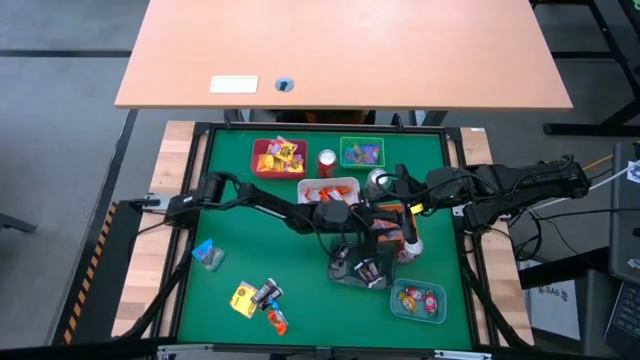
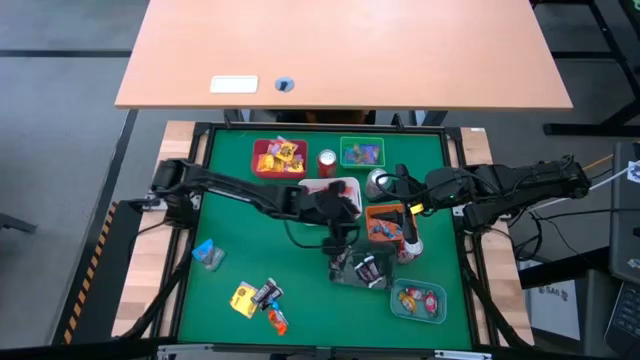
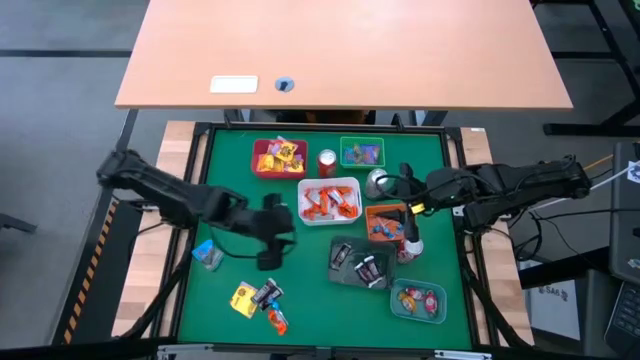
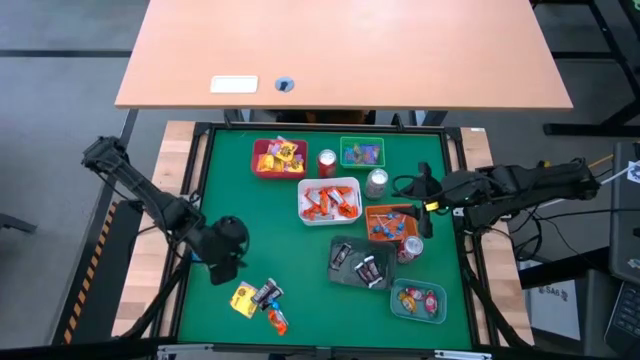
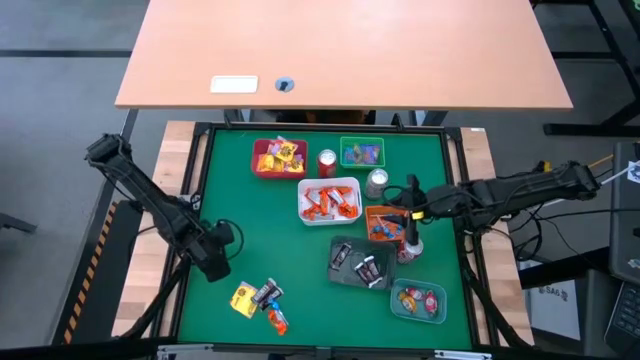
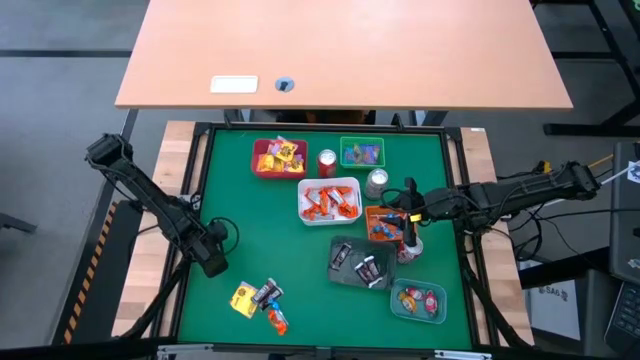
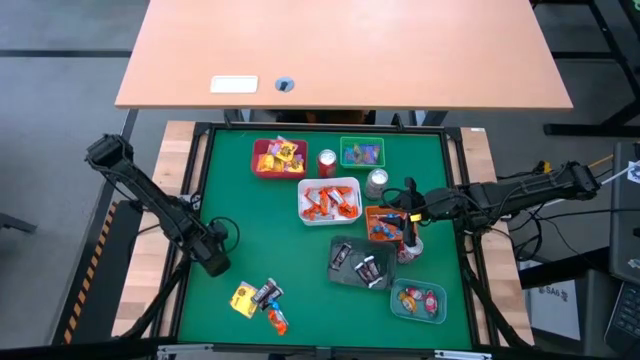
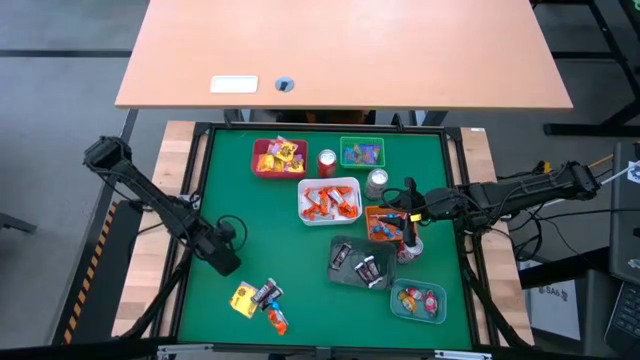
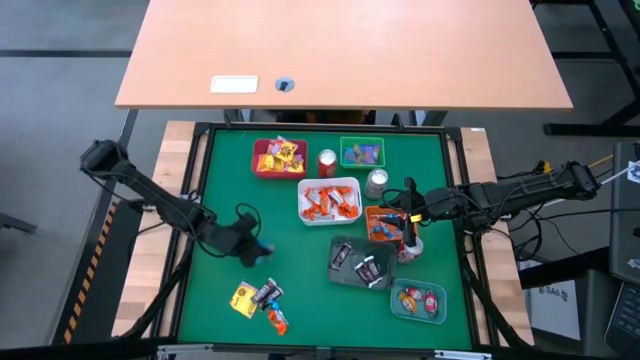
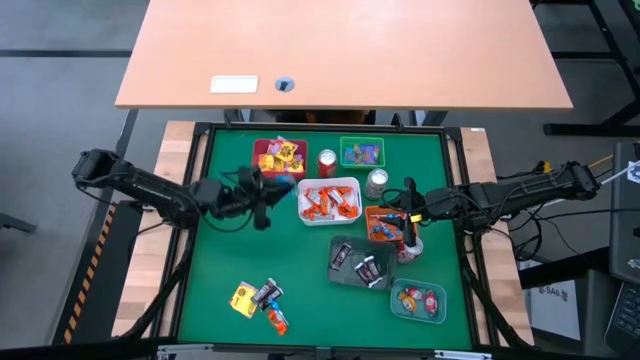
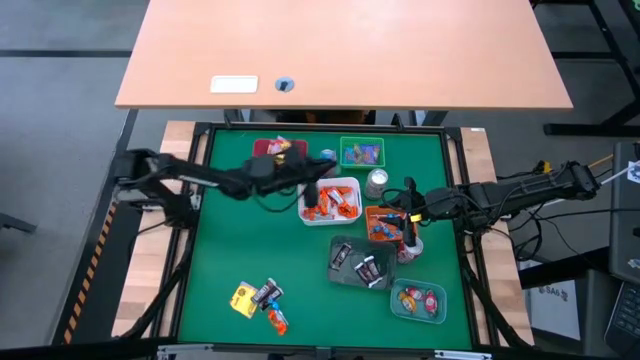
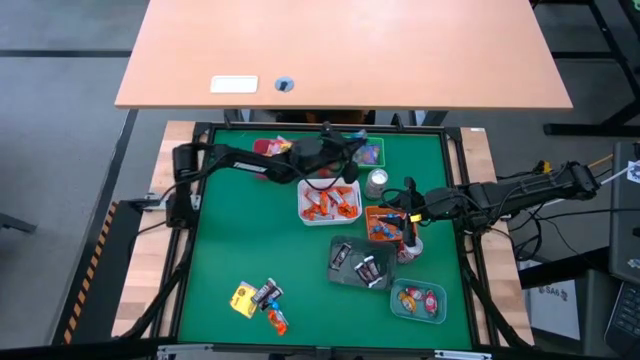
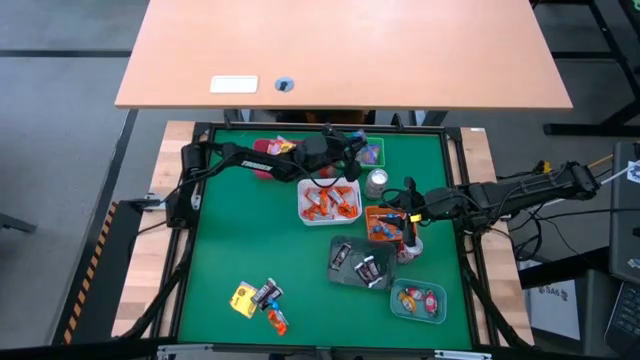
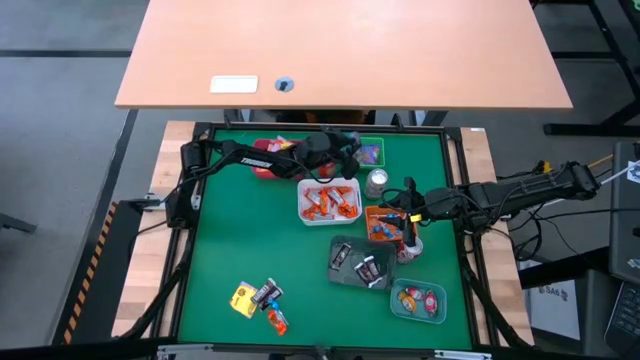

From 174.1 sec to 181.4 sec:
Task: Sort candy
Put the blue candy into the green bin

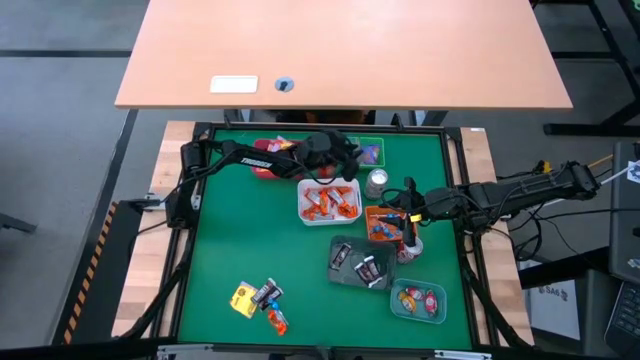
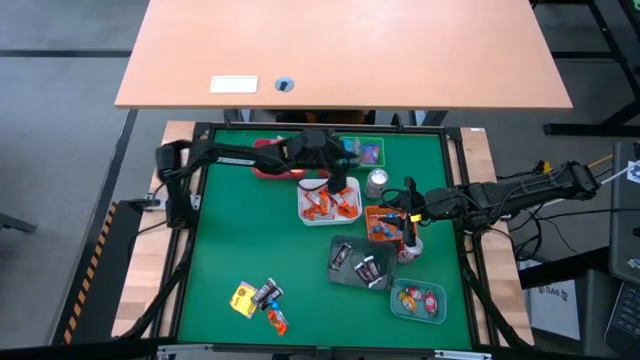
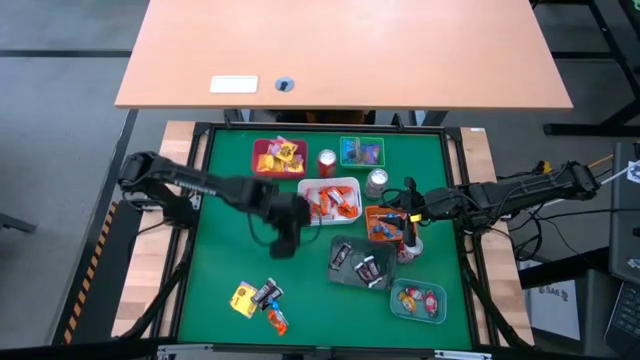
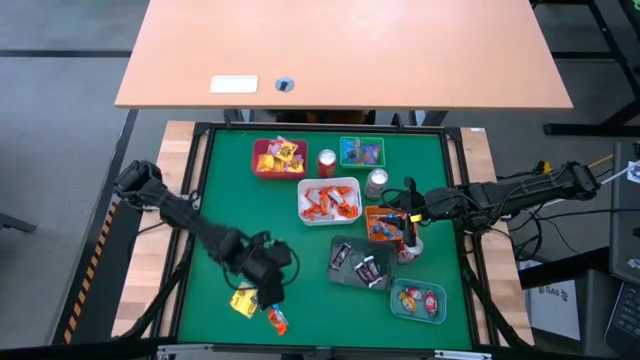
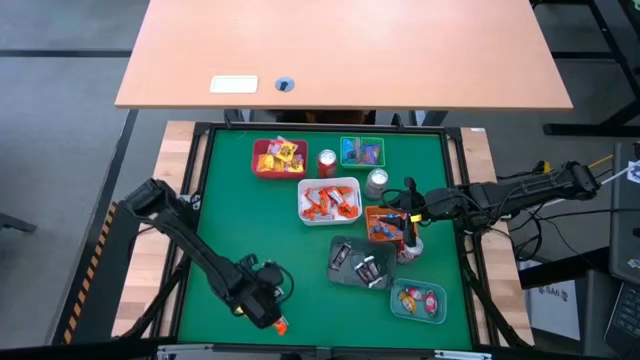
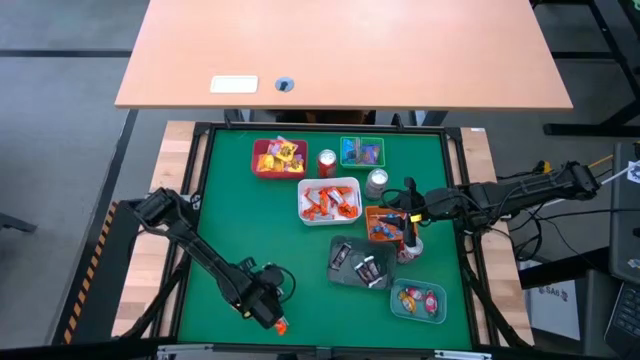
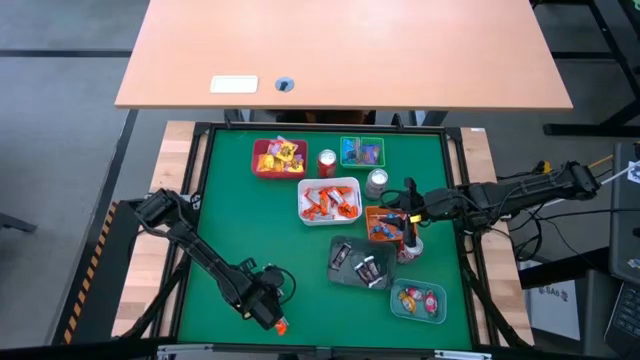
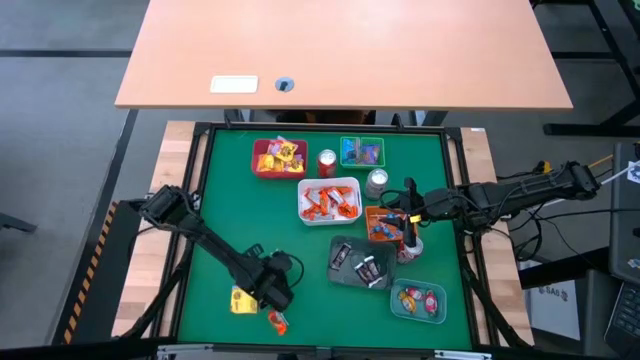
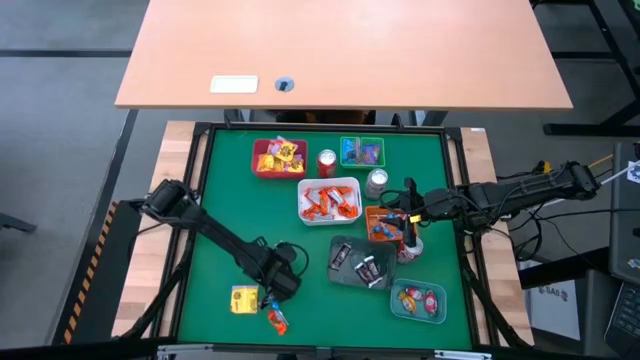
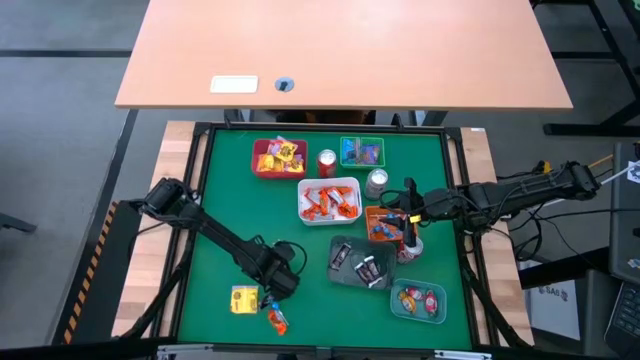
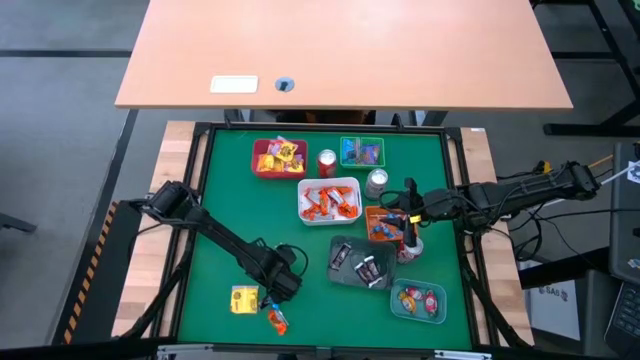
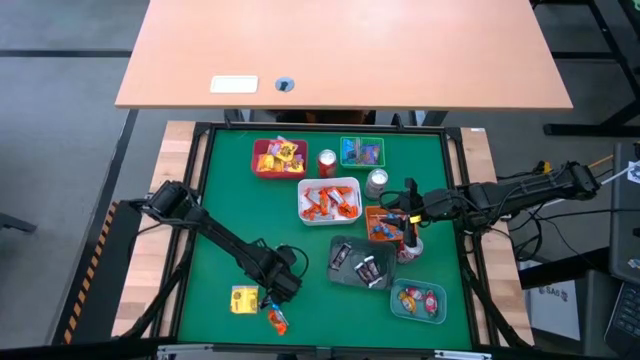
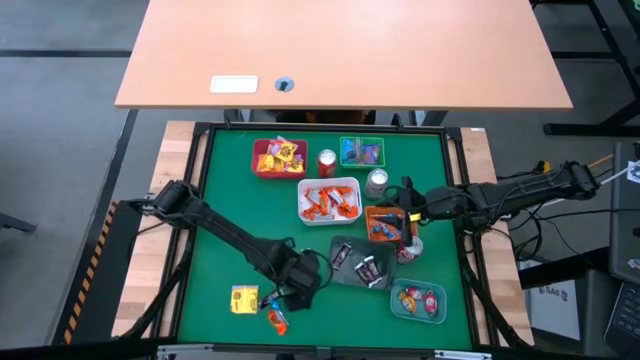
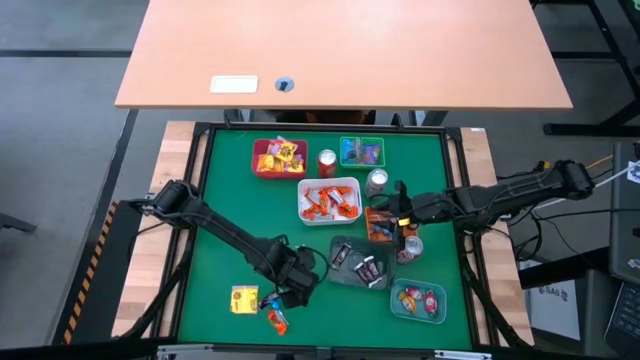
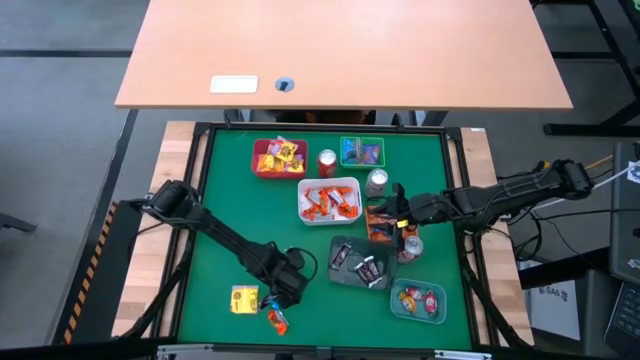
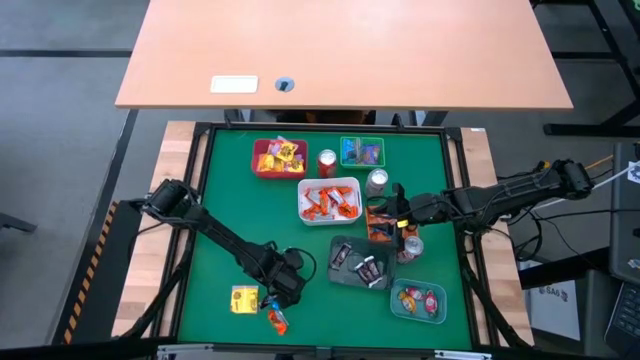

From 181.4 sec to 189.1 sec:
Put the brown chocolate bar into the black bin

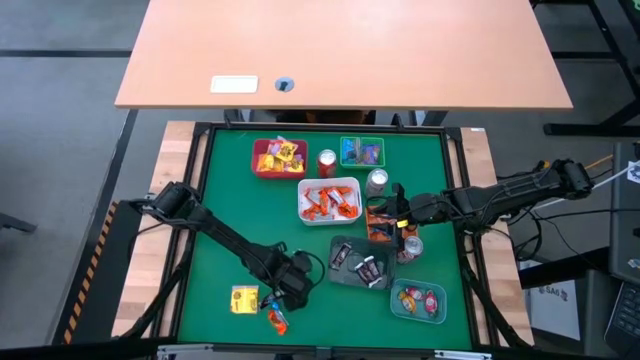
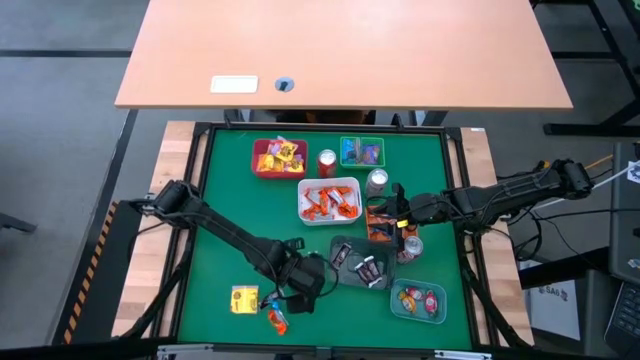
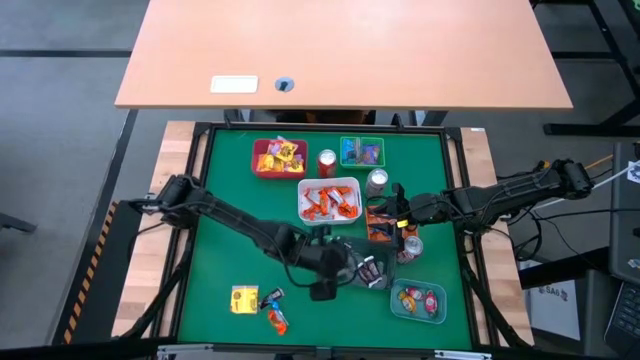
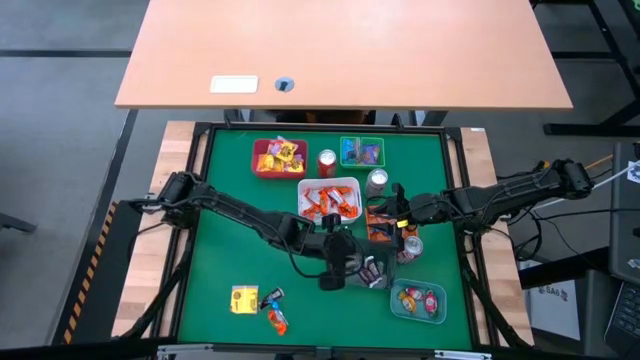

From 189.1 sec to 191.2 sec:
Put the brown chocolate bar into the black bin

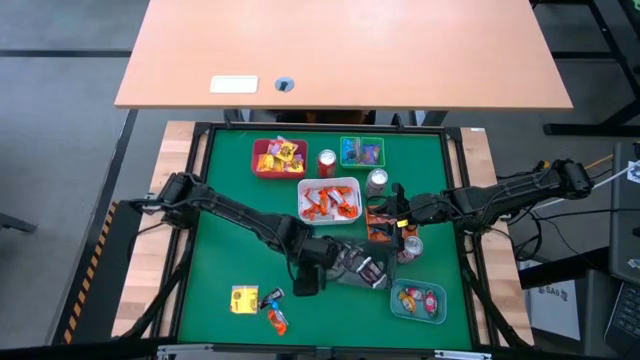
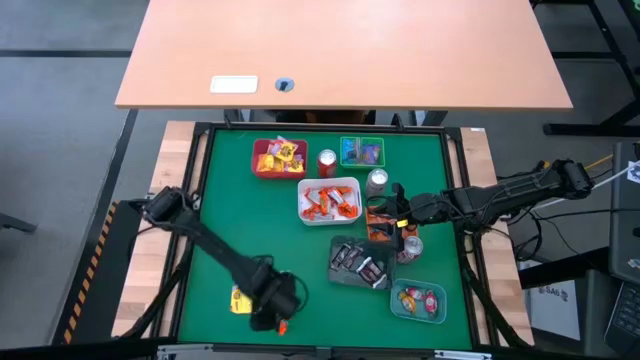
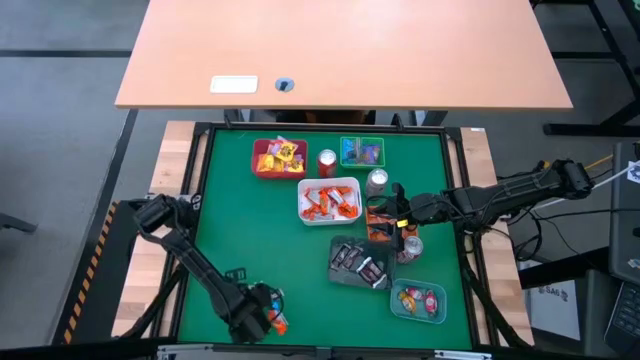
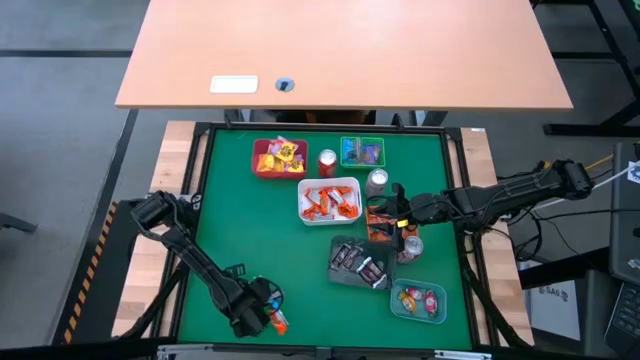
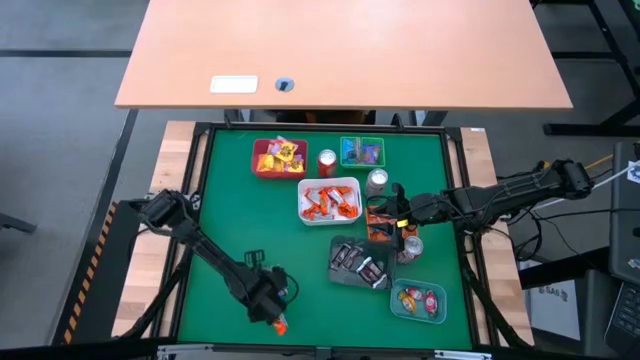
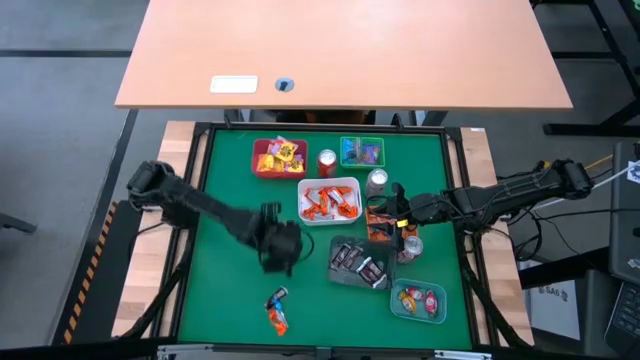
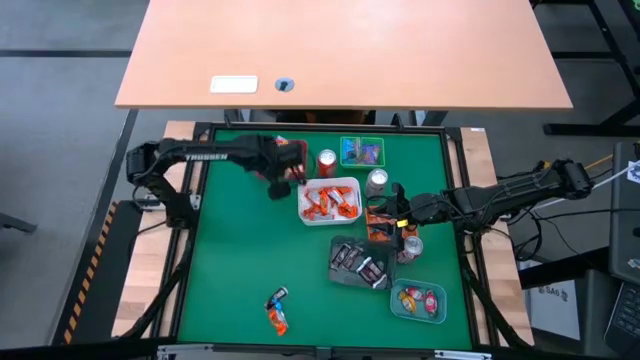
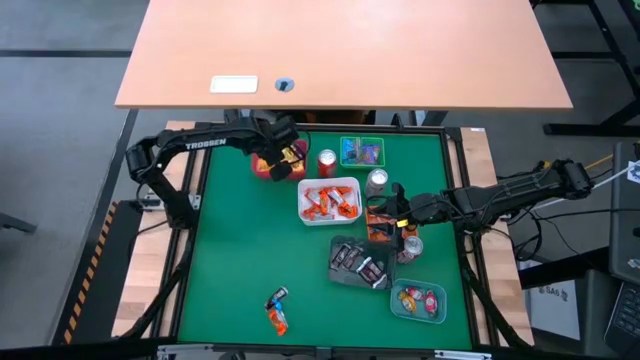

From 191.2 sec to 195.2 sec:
Put the yellow candy into the red bin
